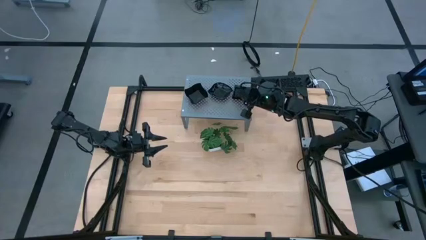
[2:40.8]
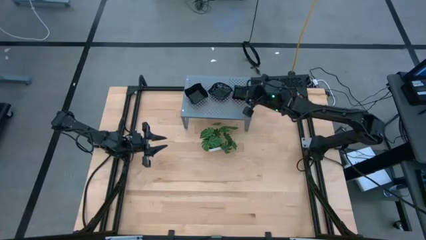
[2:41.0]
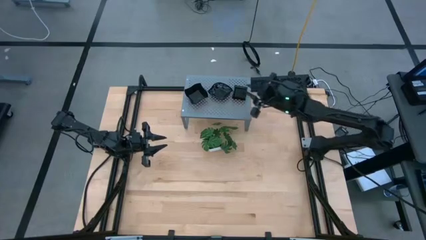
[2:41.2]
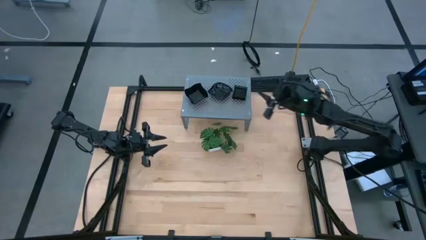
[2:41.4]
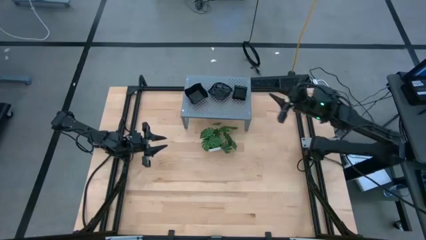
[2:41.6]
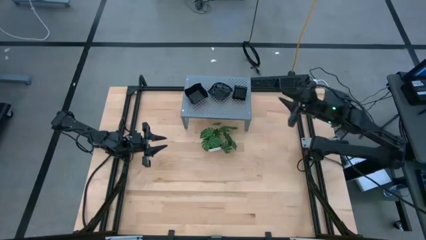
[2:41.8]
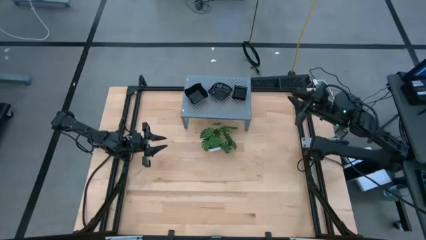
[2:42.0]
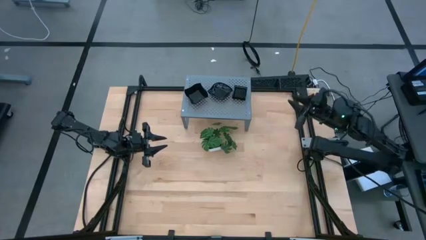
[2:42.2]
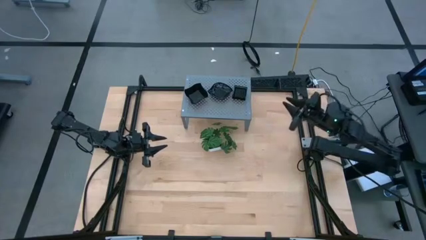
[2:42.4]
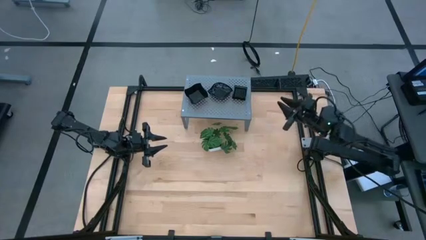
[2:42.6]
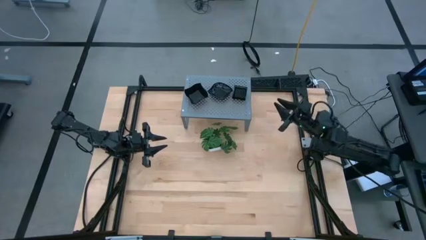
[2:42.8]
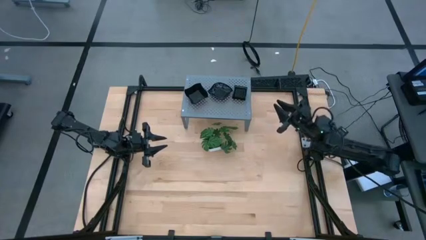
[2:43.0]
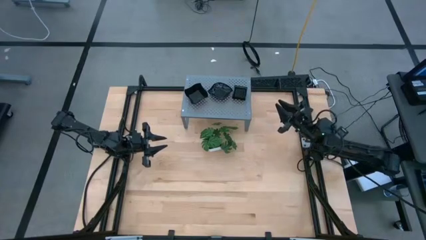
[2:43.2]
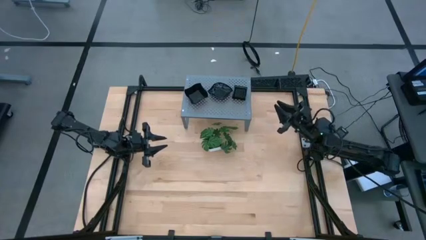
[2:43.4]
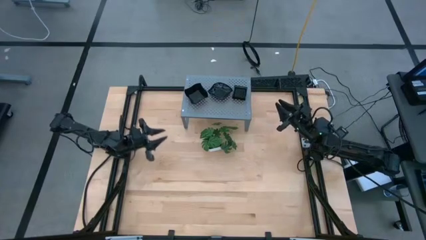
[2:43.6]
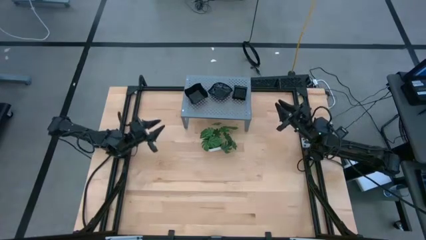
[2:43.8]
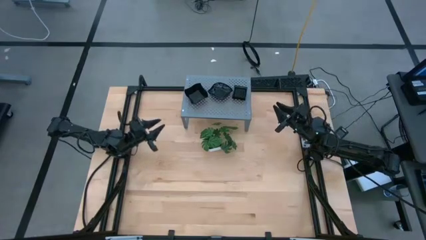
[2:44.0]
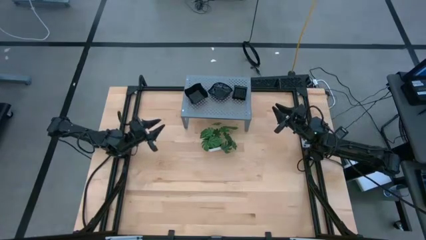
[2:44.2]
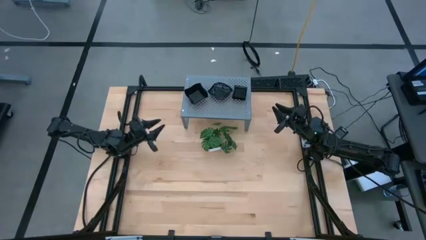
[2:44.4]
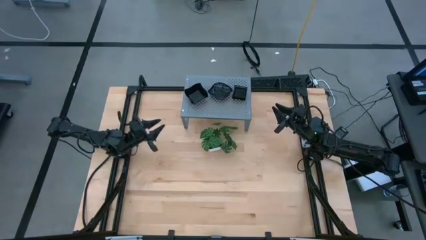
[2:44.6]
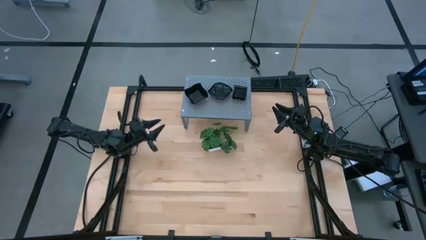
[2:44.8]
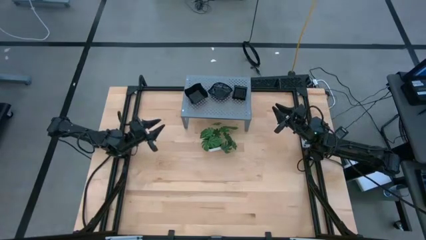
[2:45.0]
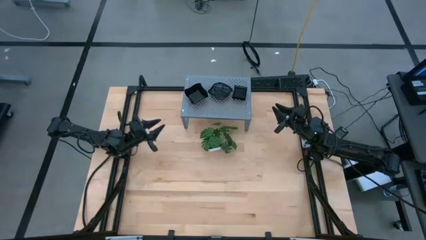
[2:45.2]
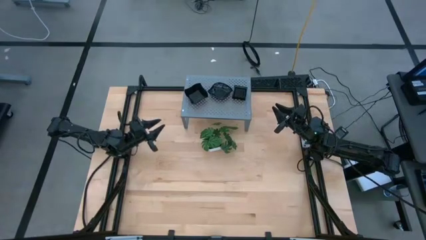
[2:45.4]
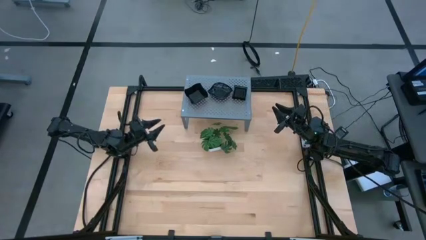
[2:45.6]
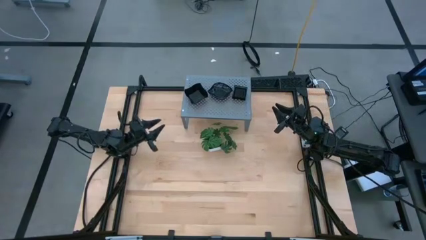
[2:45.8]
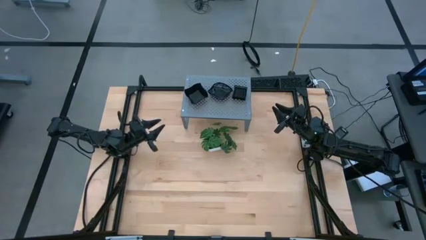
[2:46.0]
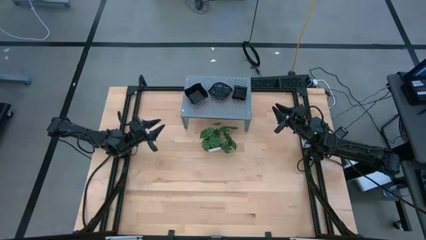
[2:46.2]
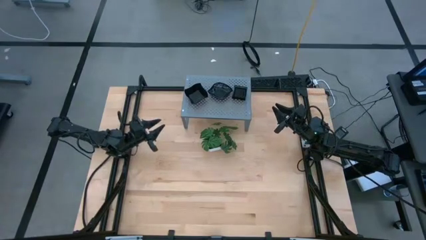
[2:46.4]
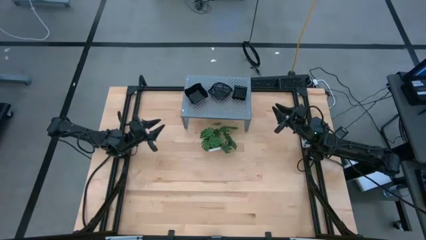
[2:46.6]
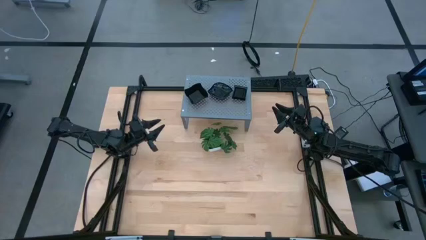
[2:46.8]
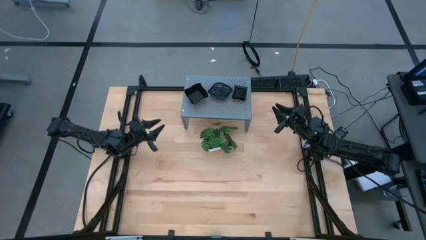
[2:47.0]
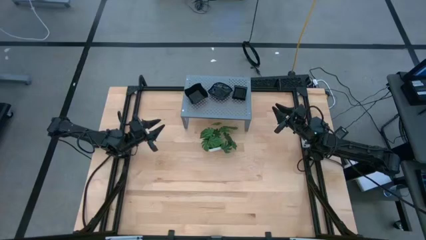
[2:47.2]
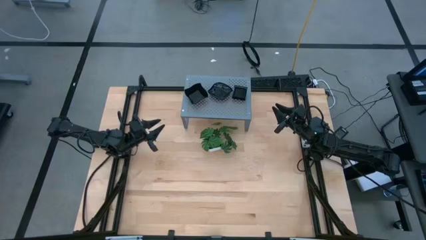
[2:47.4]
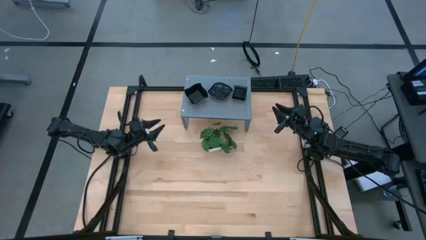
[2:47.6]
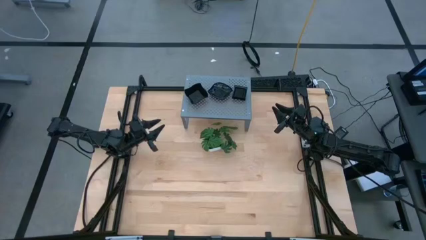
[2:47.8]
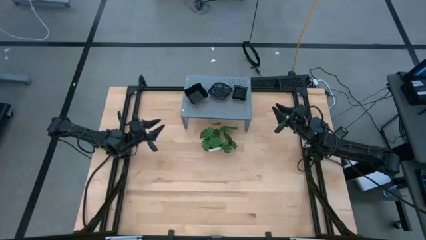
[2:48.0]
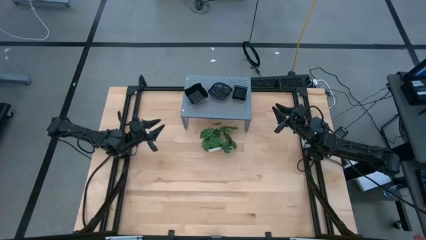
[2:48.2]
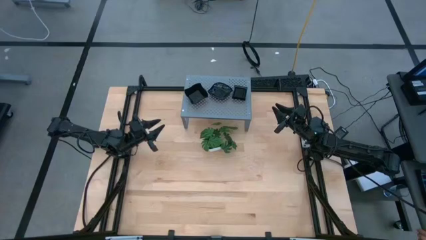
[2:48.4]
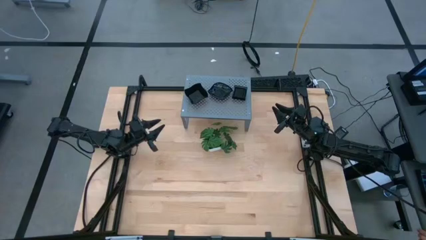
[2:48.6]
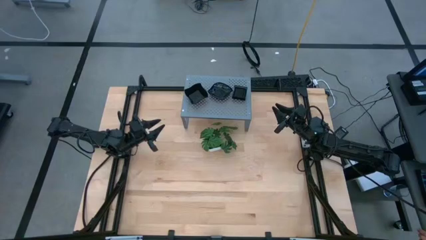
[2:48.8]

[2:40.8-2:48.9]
Task: Pick & Place Mini shaped plates
Return to Home Position

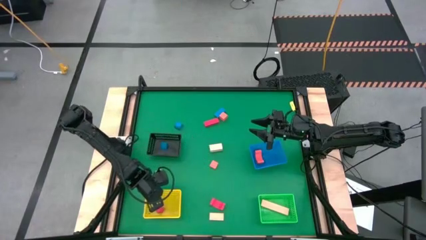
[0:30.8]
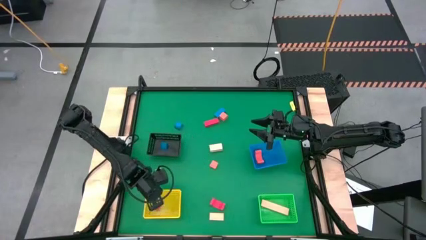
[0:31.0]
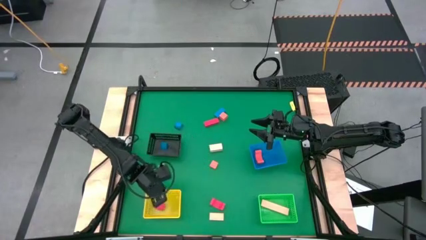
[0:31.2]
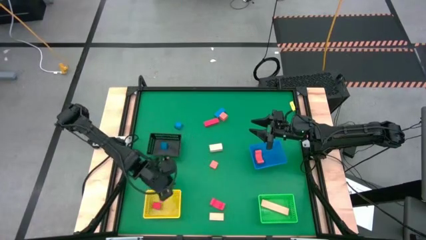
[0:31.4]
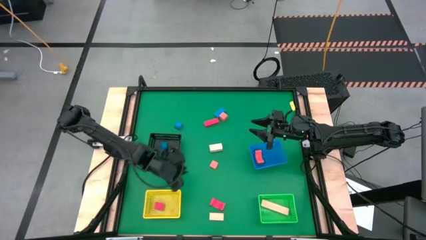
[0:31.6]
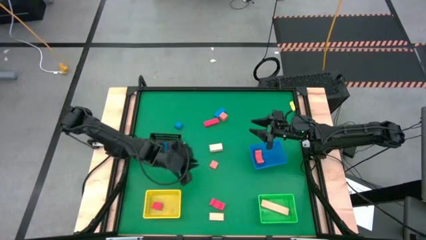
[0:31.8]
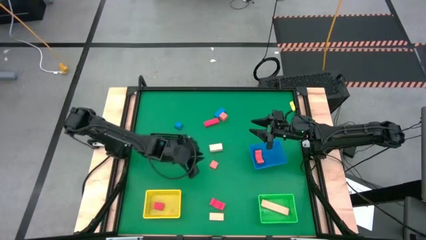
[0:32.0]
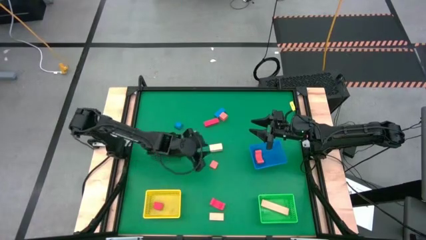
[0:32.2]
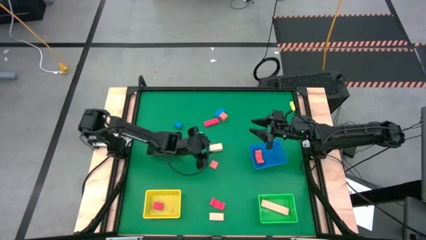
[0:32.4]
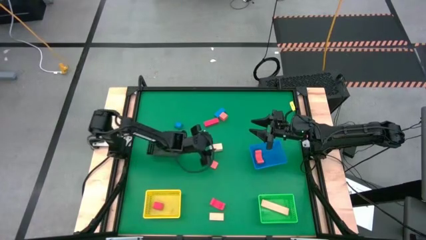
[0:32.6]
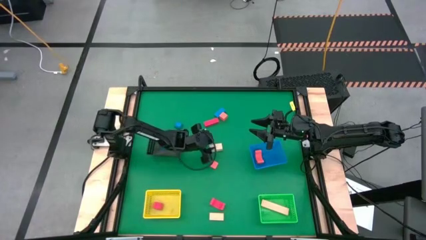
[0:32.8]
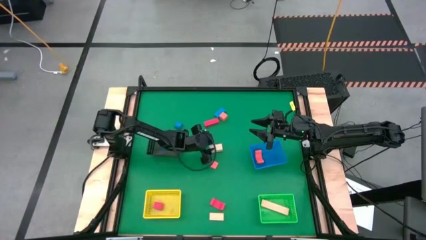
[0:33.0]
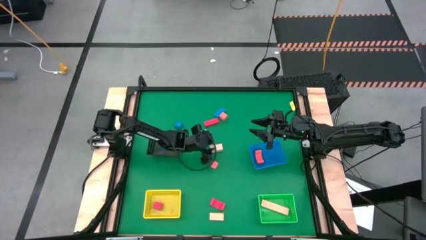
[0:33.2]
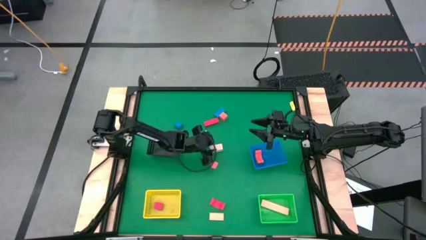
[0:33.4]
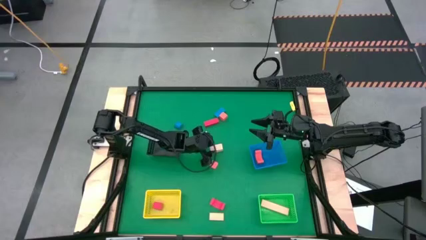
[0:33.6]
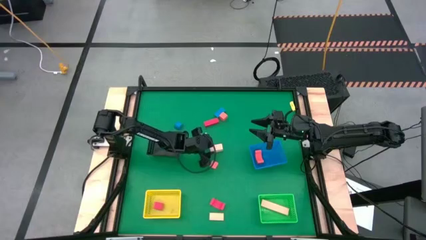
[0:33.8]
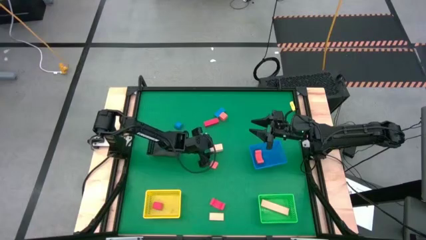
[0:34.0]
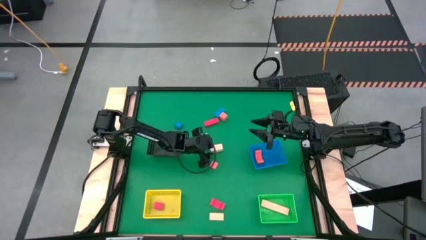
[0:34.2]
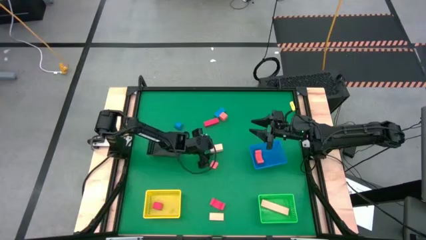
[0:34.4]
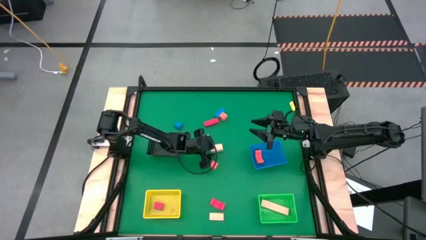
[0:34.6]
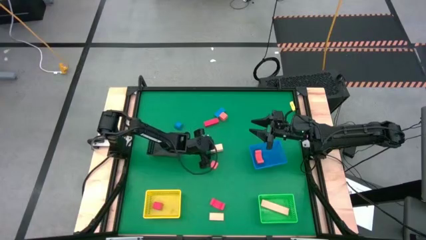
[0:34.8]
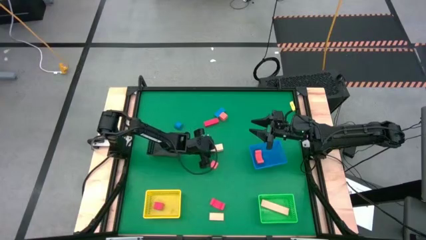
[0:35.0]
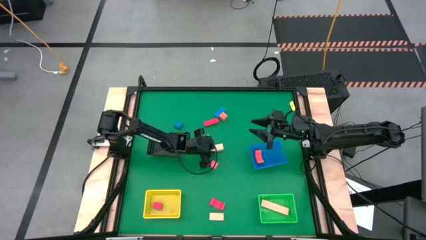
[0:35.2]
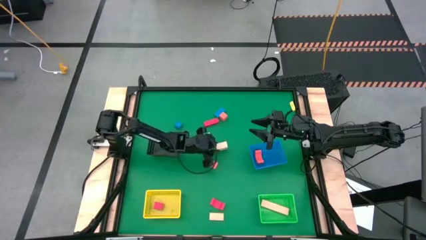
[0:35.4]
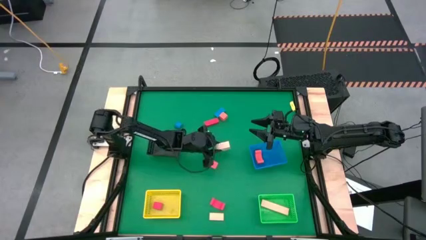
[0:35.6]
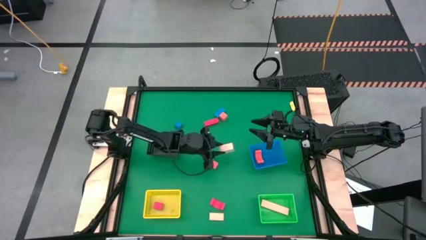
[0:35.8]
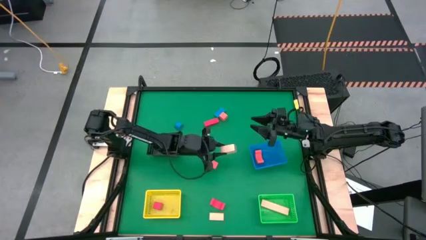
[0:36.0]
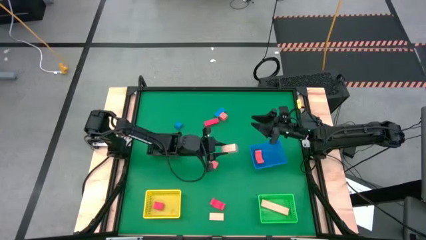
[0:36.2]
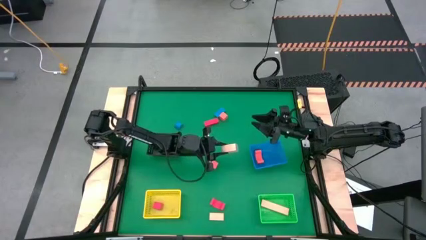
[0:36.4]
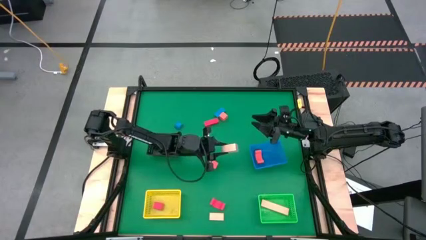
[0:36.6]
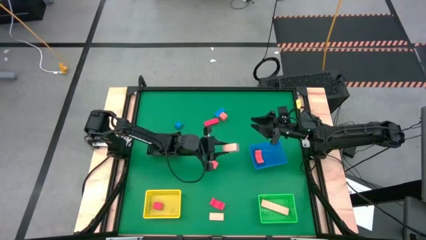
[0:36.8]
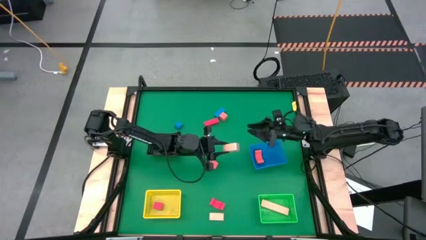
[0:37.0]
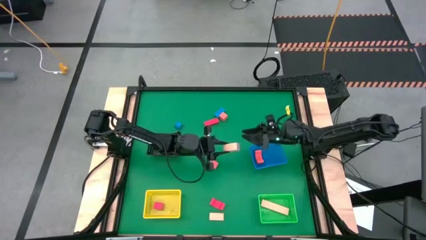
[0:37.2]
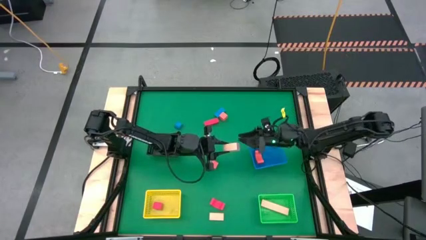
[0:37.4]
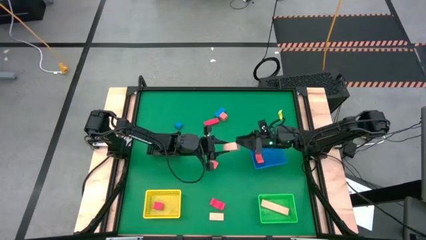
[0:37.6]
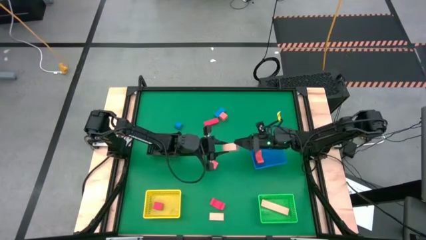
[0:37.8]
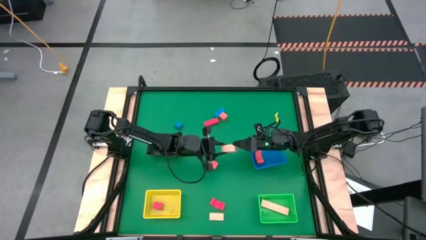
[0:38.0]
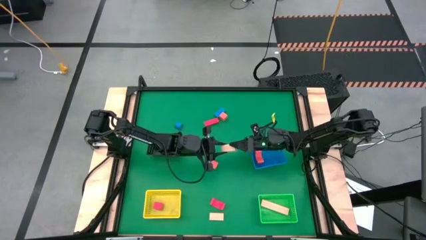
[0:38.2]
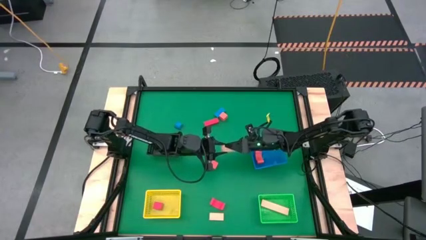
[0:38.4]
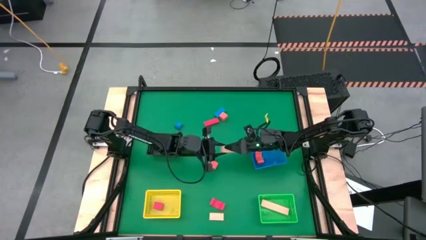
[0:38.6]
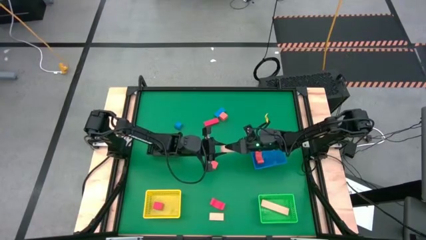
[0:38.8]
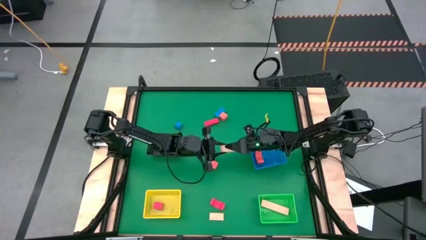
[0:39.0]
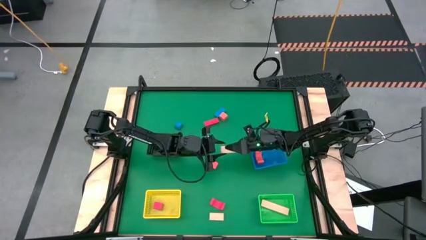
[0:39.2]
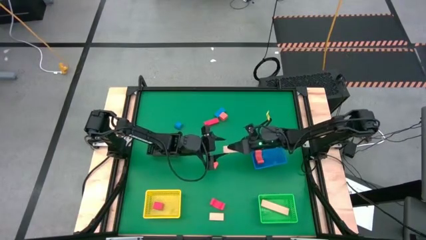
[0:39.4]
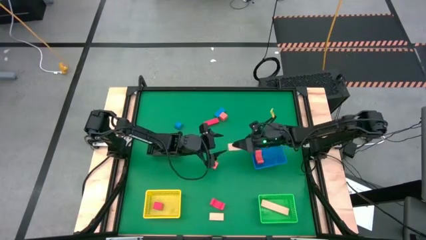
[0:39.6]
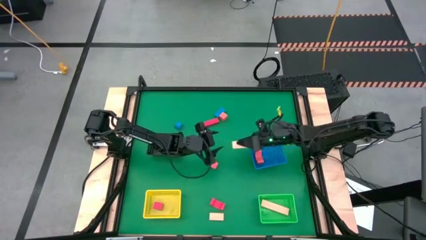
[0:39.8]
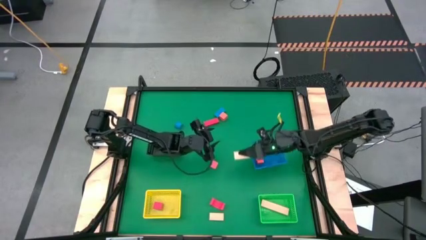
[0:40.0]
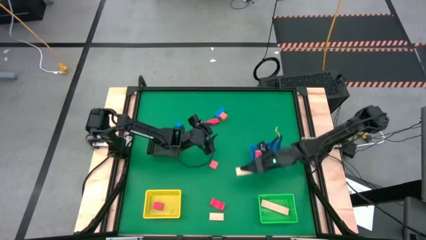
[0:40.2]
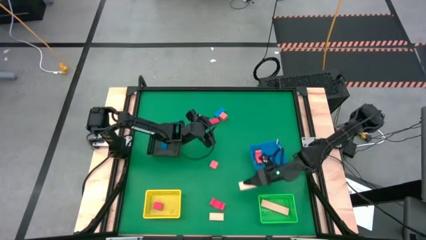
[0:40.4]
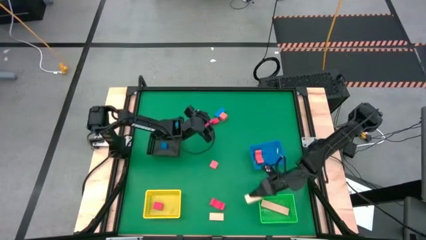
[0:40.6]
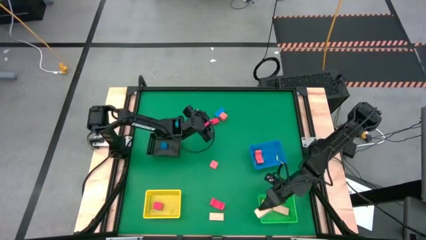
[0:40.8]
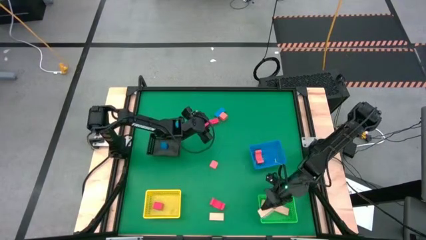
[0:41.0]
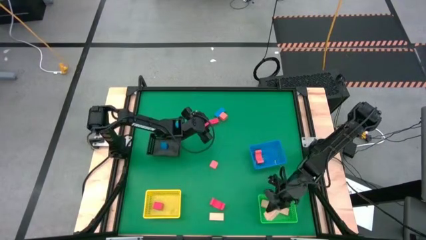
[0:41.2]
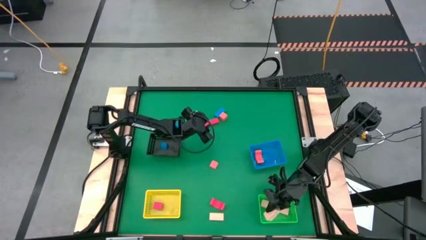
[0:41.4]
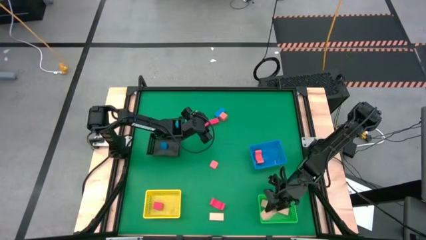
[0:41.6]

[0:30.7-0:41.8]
Task: Sort & place blocks by color
Put the top brown block into the green bin
